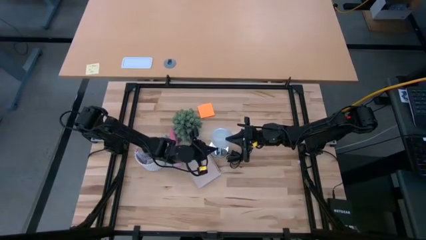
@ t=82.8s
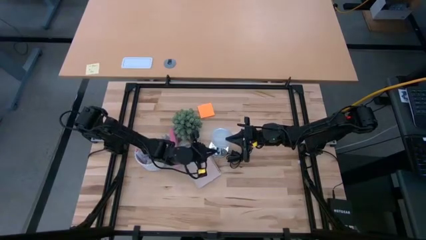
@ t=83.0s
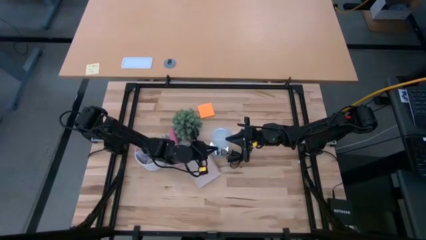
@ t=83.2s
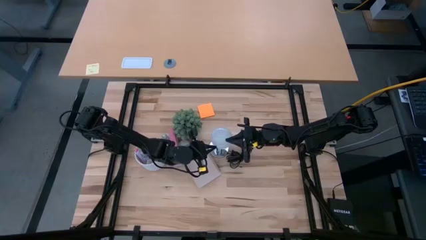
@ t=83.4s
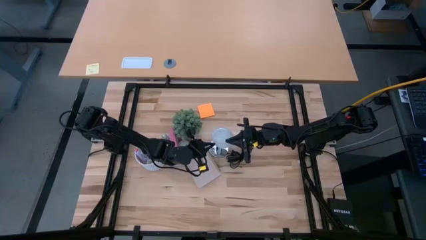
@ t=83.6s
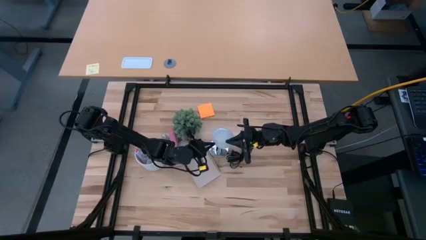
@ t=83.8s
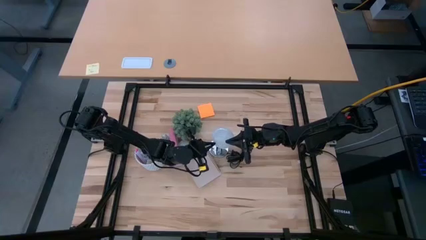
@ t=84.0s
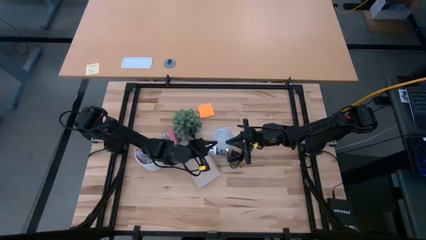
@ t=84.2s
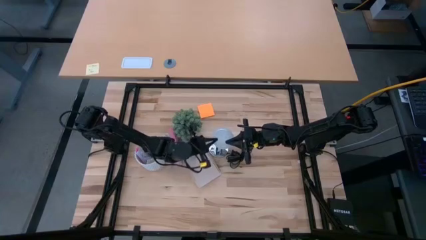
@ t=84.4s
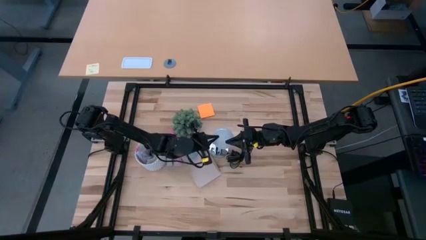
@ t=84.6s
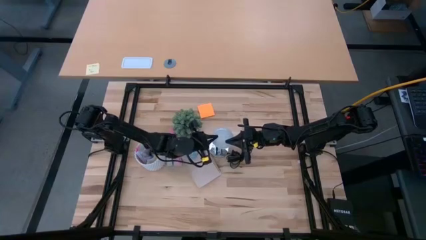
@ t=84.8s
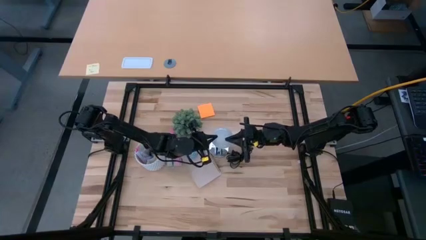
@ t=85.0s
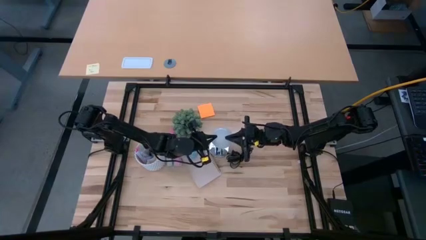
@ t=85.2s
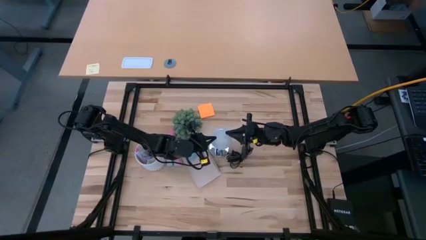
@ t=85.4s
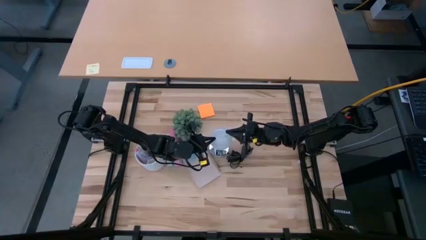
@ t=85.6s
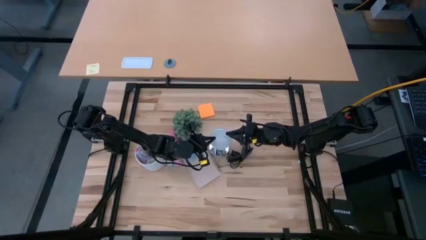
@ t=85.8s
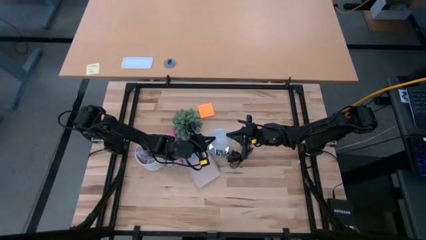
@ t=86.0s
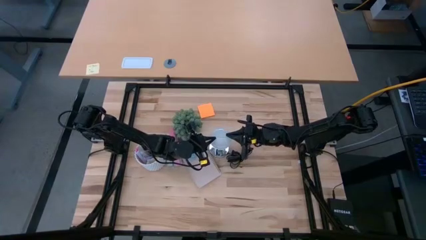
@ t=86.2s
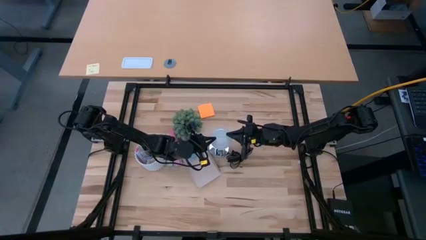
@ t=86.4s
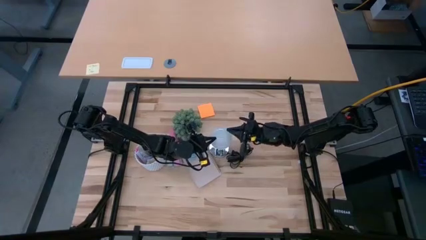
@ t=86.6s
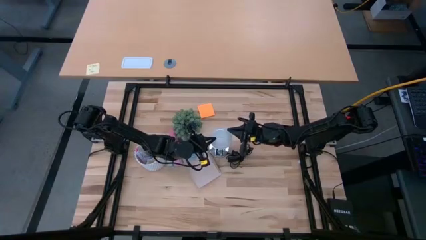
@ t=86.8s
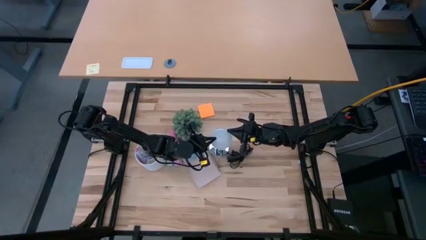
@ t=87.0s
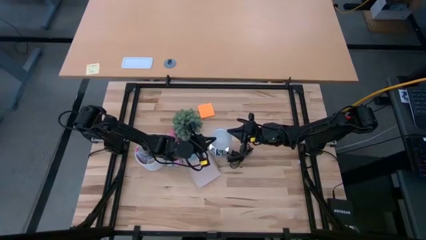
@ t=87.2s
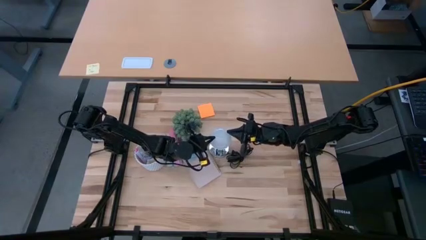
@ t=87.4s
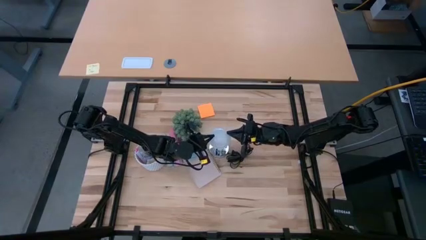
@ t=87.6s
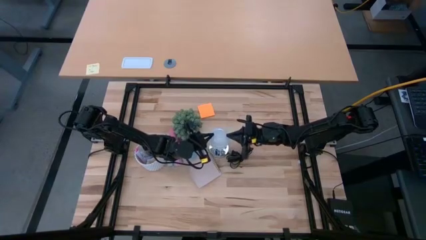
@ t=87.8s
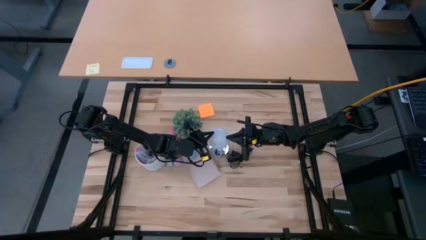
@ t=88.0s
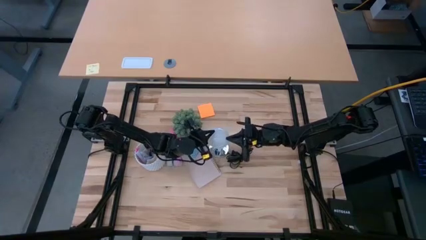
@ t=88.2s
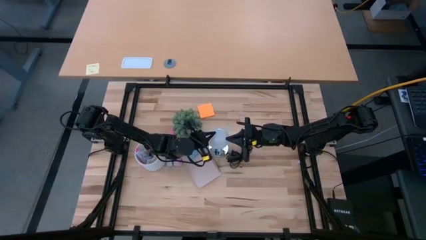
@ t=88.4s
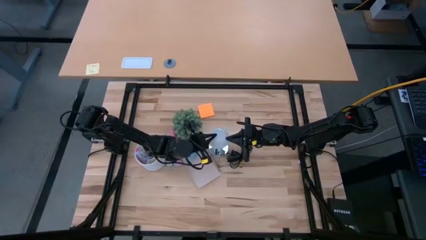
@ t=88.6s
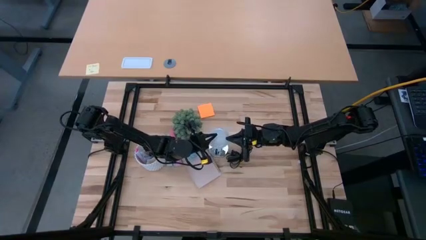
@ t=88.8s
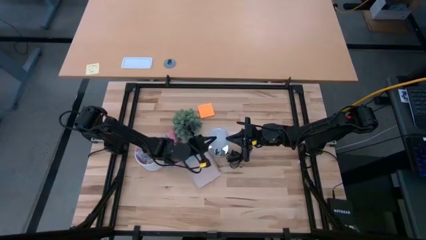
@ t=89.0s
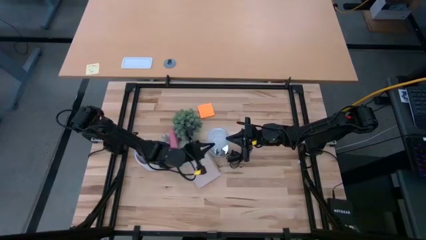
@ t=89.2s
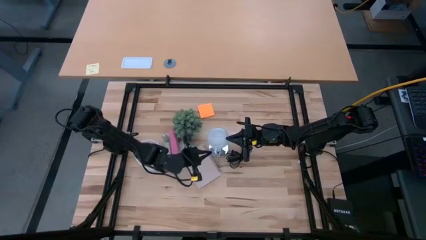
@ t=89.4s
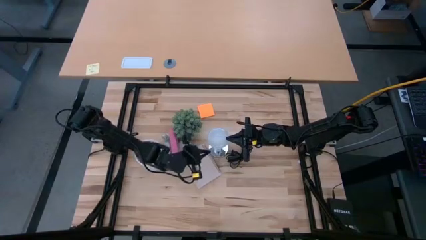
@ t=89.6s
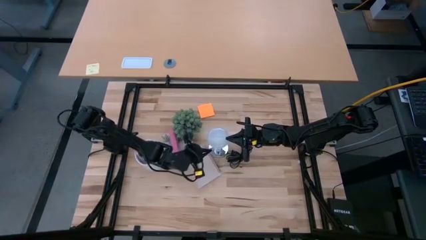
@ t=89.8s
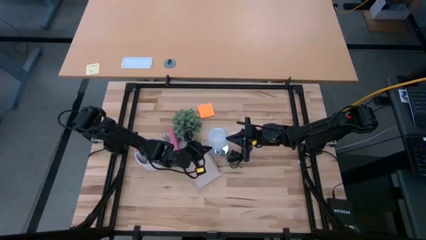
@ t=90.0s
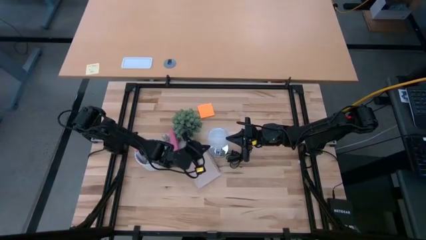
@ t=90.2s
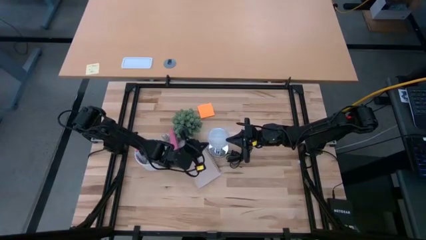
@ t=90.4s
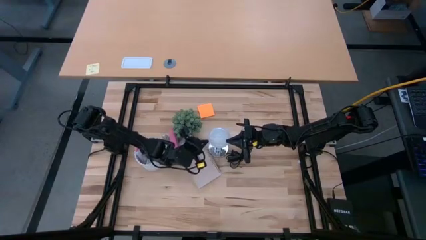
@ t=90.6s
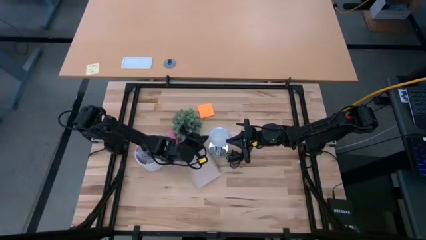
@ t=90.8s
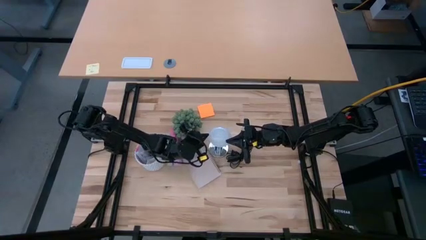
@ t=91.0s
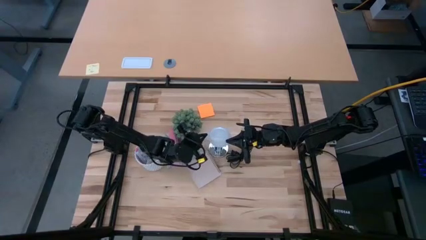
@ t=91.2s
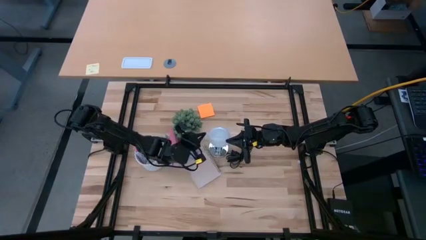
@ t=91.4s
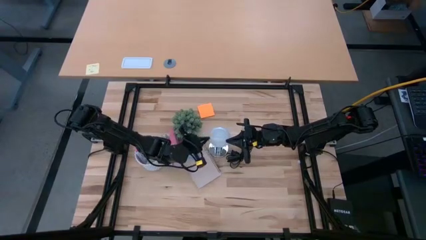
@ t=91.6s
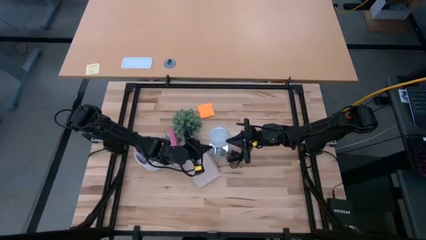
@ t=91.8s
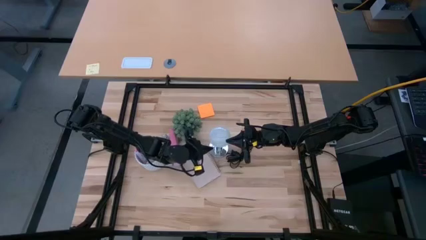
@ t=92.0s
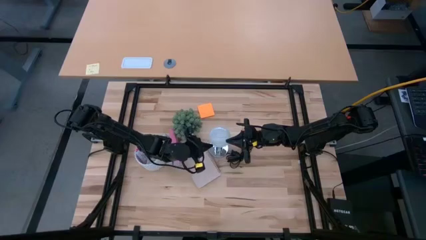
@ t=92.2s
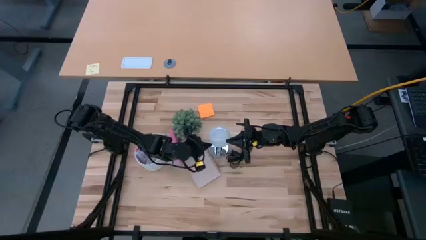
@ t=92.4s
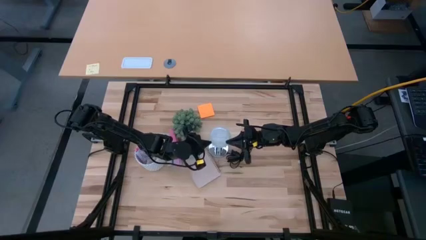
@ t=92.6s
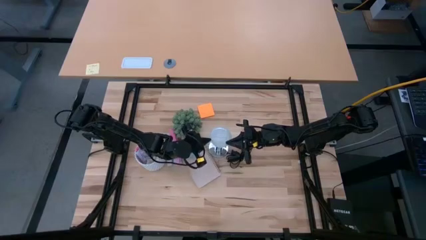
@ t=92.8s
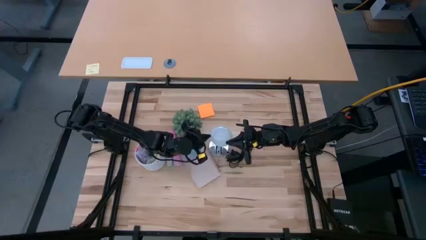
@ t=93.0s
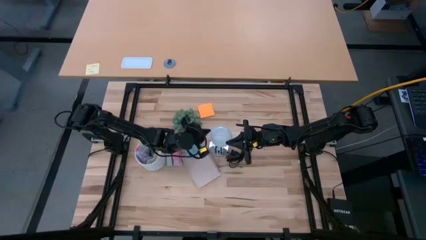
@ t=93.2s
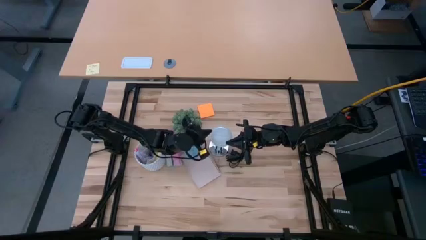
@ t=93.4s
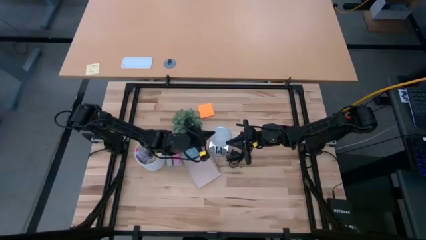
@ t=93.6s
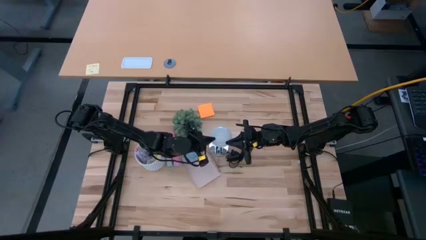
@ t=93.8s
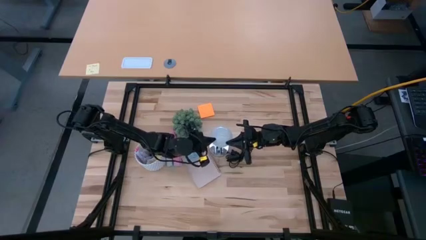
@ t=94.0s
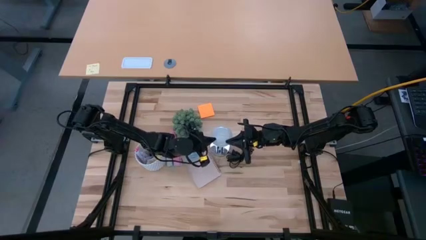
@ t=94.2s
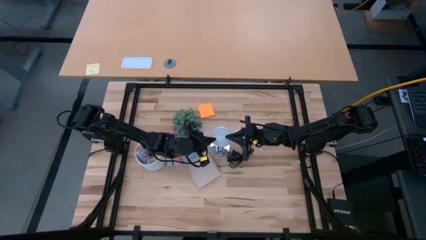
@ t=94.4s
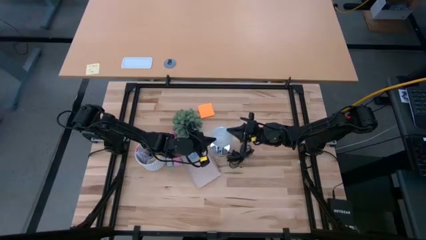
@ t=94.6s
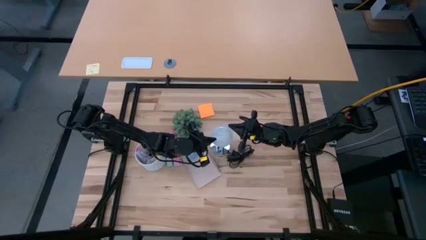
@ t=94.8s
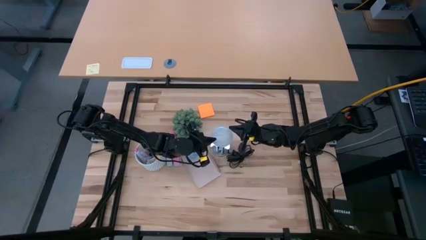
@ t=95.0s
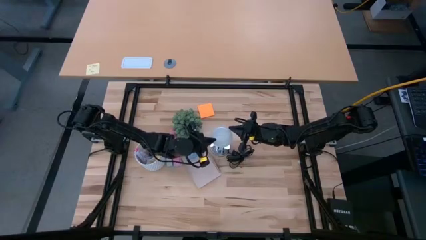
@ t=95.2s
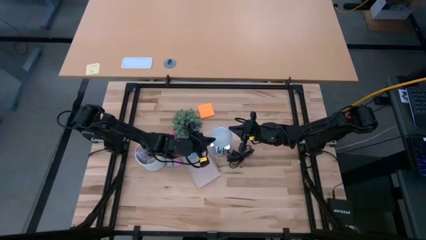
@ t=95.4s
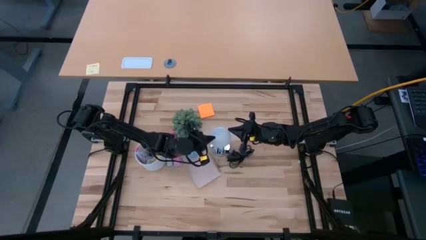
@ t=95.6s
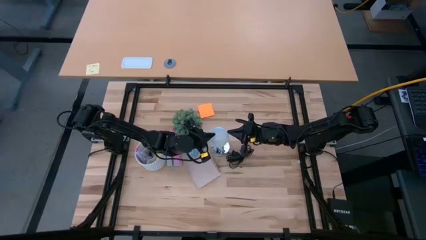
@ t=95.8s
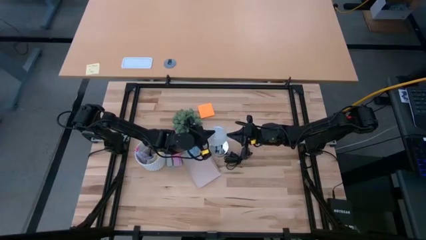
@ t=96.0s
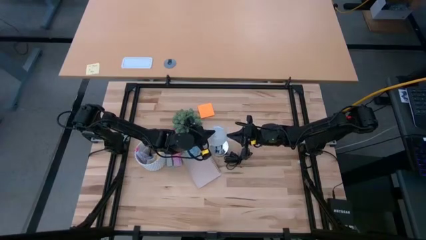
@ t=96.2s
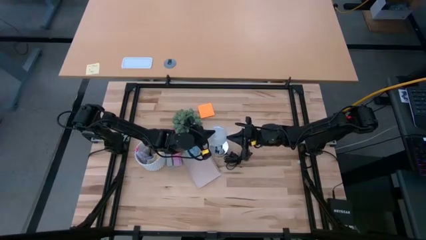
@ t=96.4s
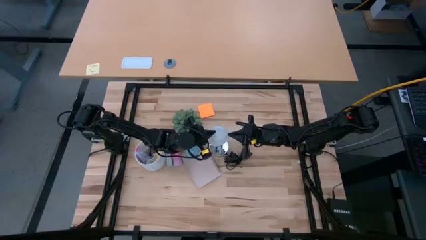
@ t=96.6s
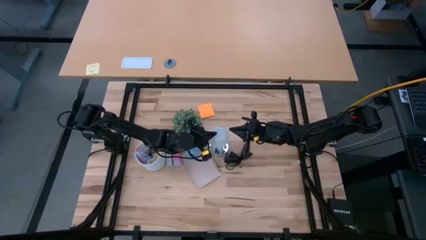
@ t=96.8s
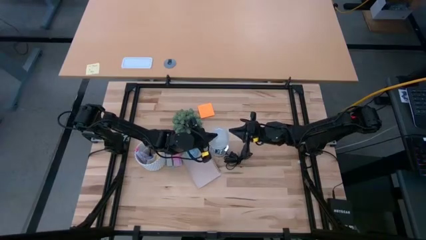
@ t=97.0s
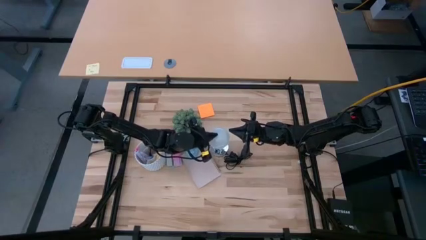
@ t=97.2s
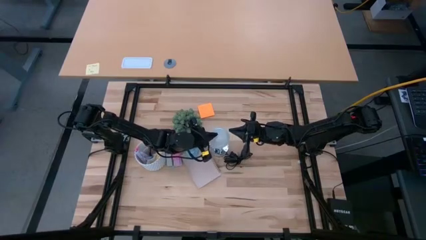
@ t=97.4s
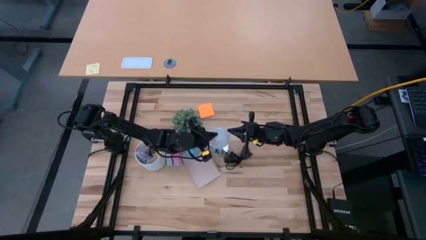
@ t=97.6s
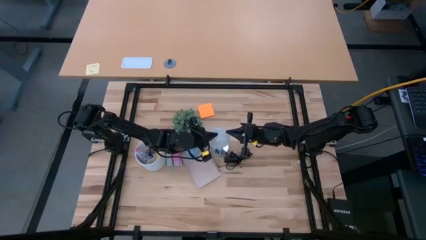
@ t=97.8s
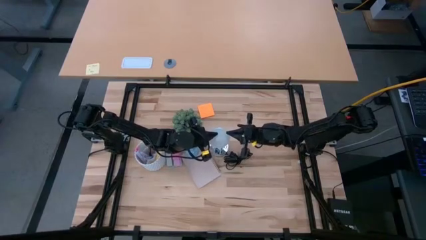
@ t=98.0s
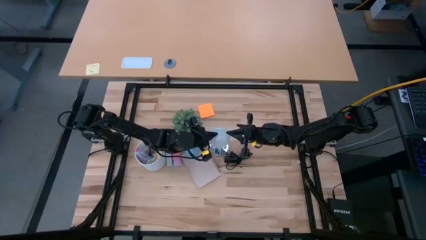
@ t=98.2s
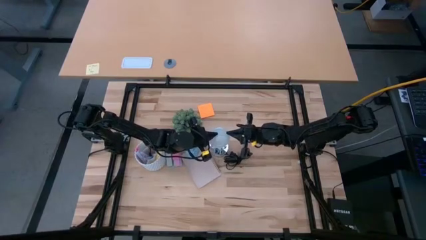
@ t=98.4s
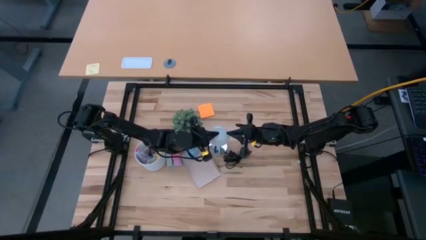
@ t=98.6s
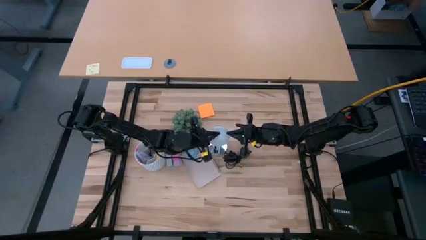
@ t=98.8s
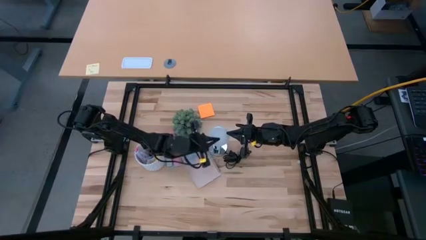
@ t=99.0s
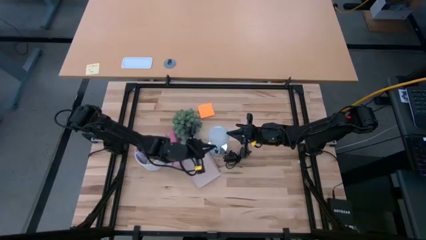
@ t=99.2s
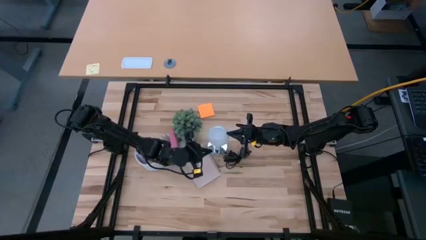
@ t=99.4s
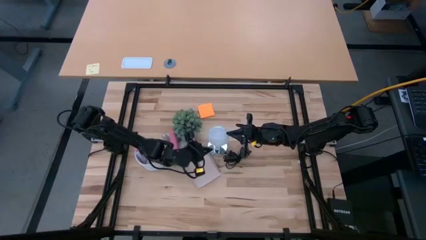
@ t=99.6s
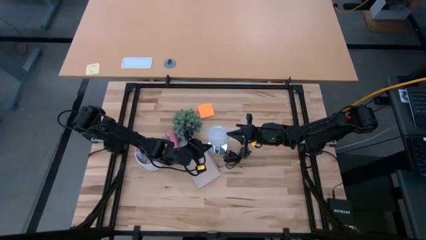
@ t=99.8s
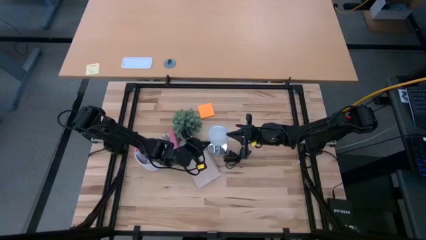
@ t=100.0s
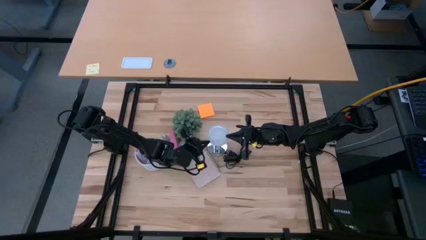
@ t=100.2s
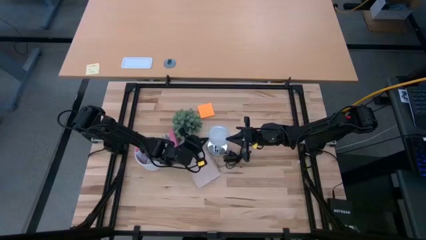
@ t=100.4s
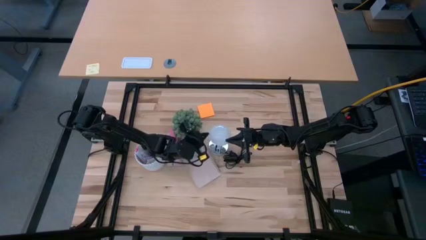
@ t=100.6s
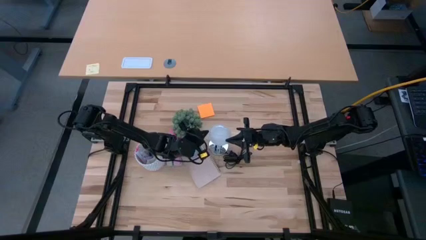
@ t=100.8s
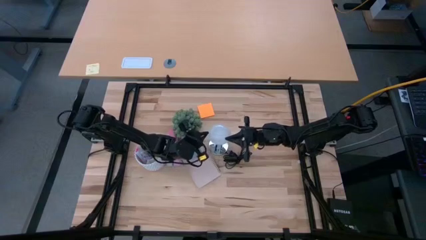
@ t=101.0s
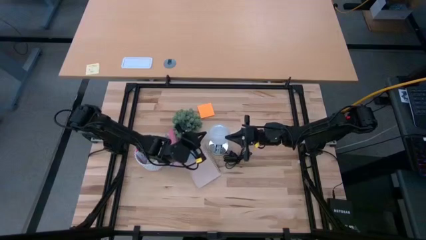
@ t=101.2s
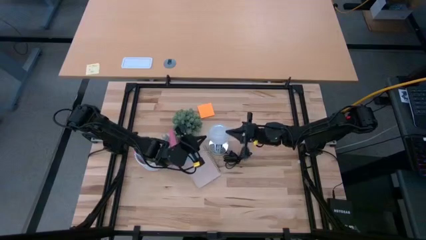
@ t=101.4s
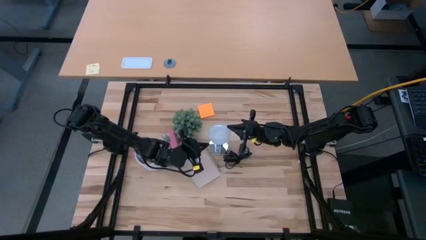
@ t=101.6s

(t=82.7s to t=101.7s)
Task: Screw lightbulb
Insert the lightbulb into the silver lamp socket
